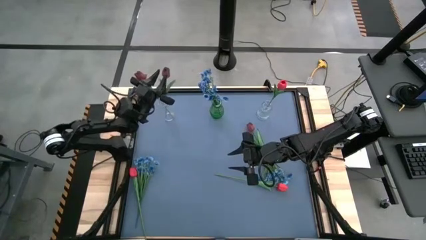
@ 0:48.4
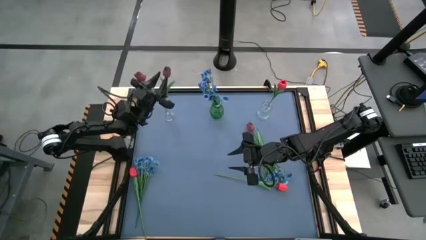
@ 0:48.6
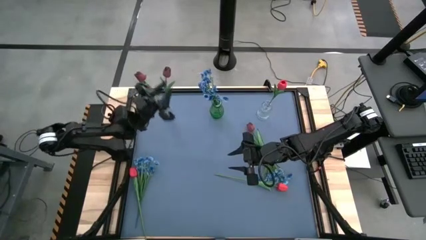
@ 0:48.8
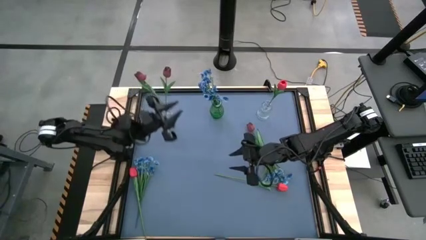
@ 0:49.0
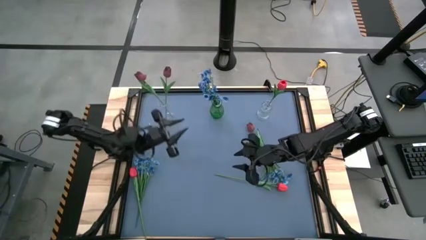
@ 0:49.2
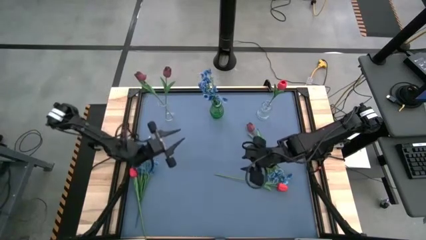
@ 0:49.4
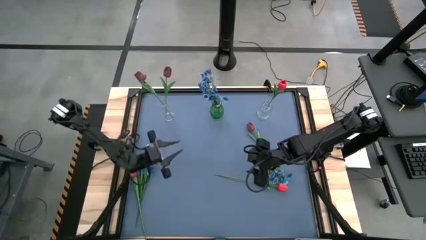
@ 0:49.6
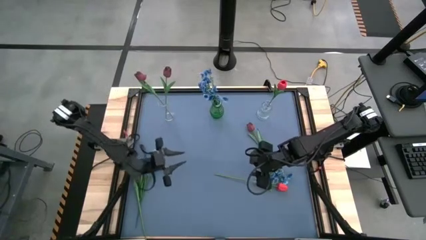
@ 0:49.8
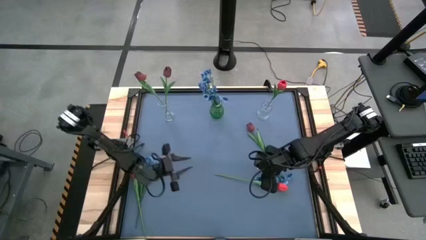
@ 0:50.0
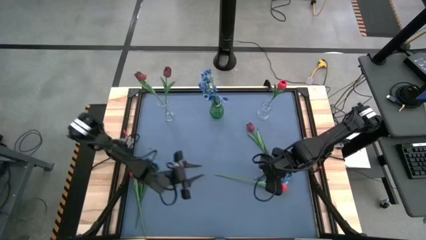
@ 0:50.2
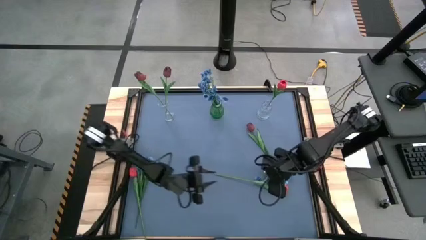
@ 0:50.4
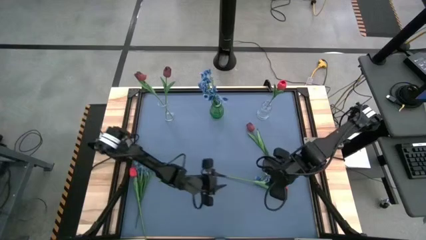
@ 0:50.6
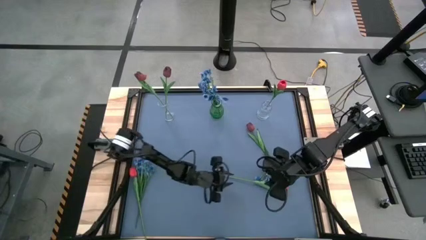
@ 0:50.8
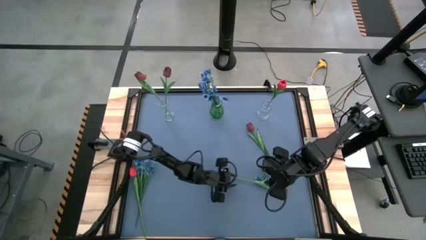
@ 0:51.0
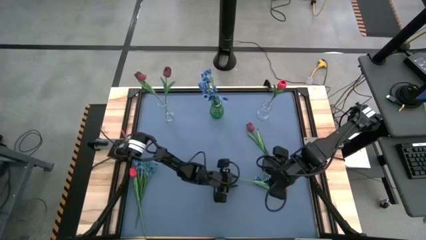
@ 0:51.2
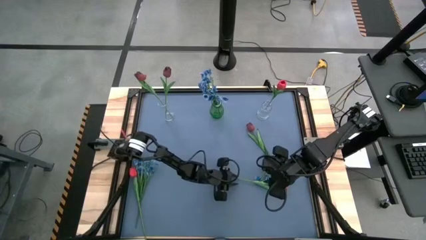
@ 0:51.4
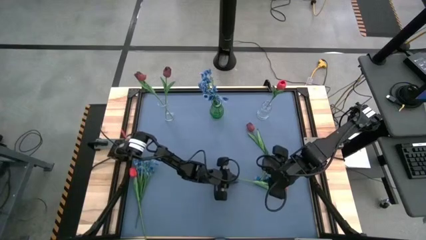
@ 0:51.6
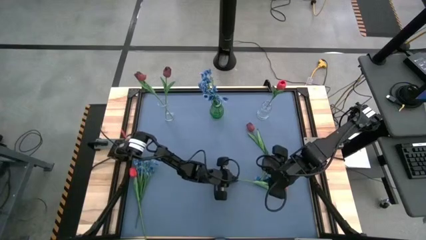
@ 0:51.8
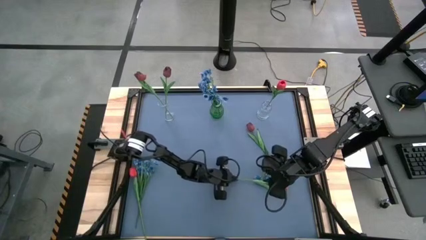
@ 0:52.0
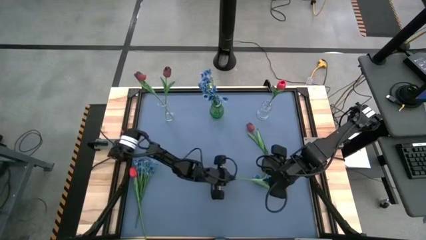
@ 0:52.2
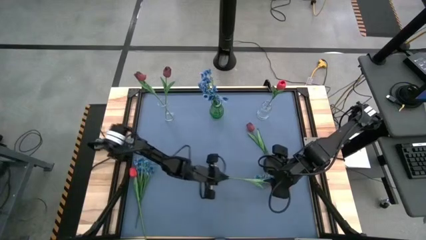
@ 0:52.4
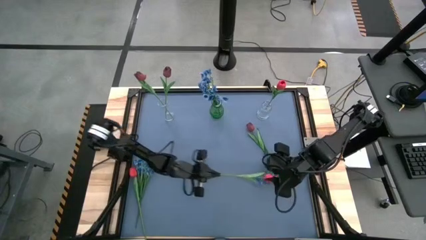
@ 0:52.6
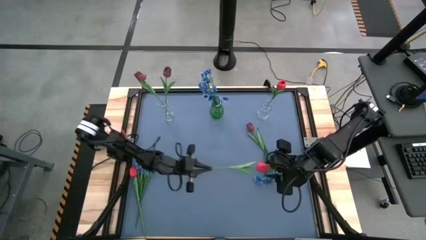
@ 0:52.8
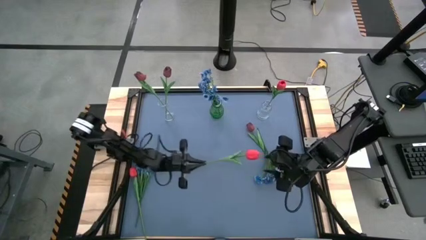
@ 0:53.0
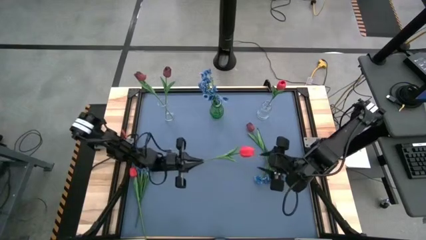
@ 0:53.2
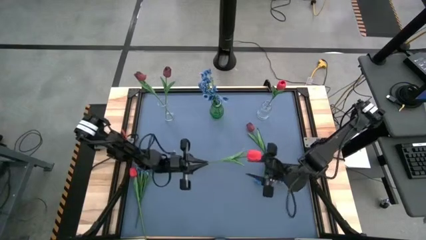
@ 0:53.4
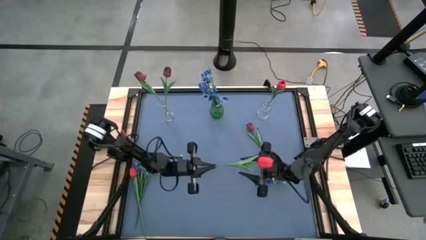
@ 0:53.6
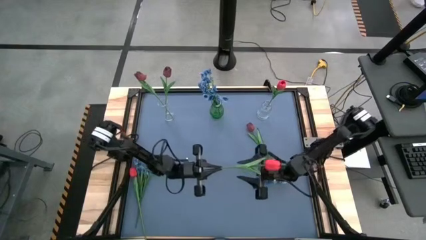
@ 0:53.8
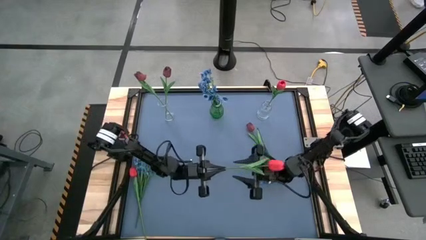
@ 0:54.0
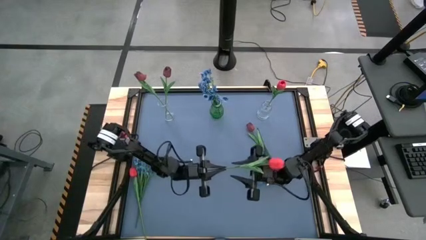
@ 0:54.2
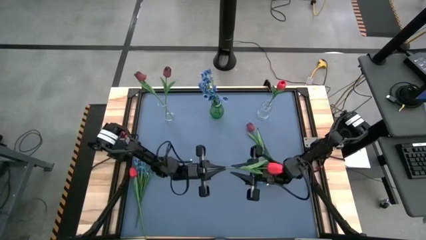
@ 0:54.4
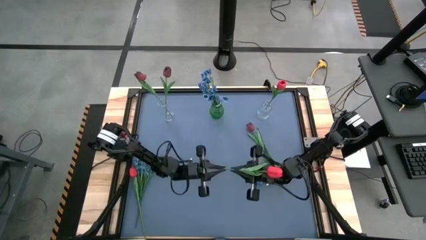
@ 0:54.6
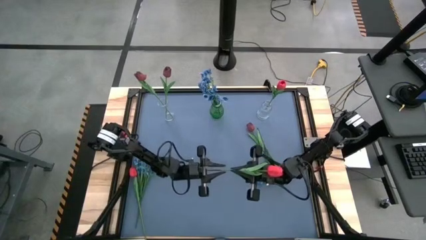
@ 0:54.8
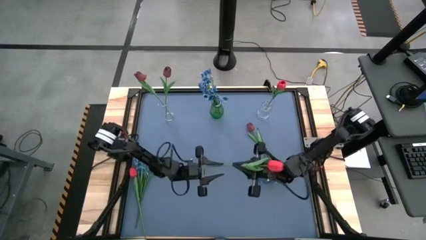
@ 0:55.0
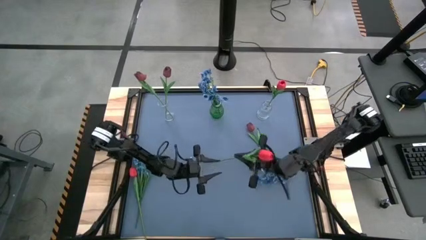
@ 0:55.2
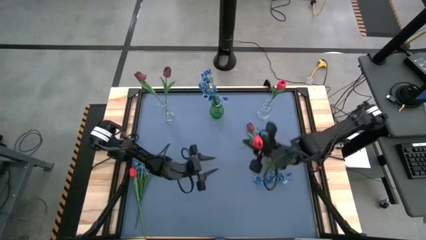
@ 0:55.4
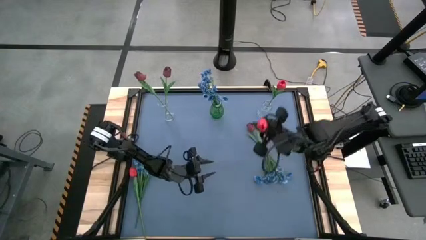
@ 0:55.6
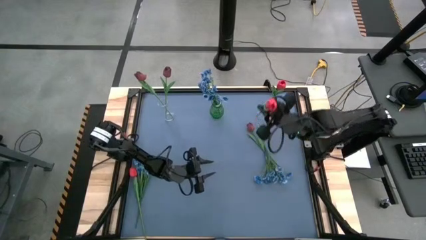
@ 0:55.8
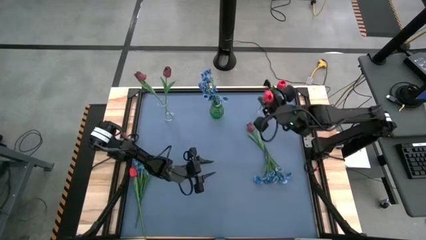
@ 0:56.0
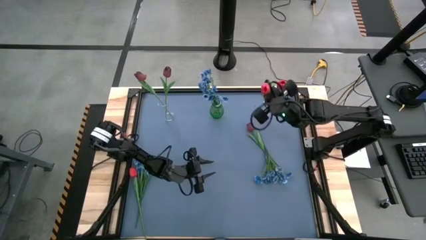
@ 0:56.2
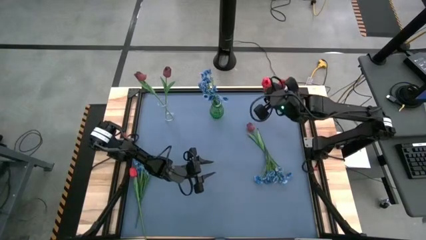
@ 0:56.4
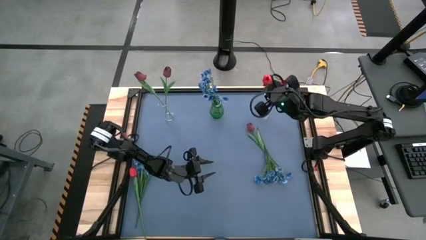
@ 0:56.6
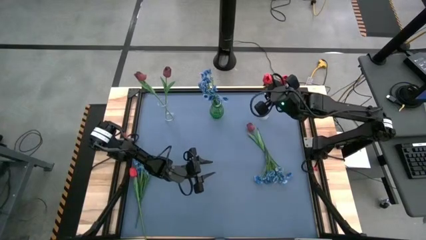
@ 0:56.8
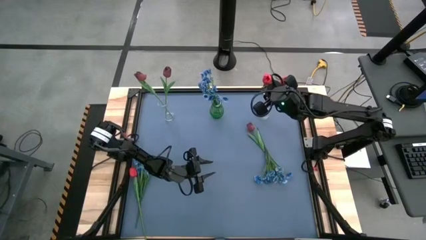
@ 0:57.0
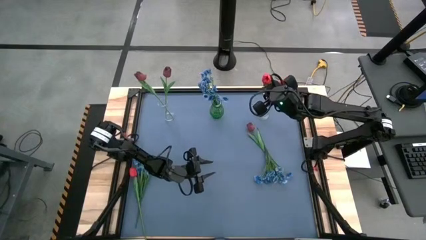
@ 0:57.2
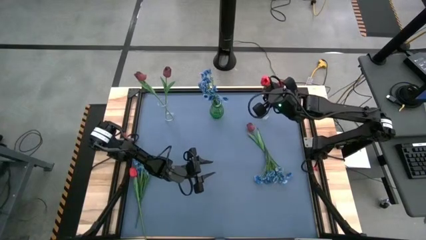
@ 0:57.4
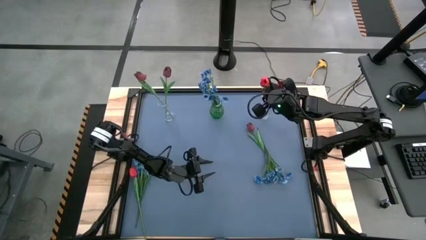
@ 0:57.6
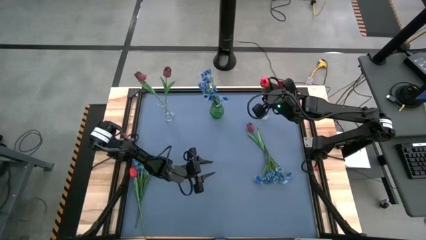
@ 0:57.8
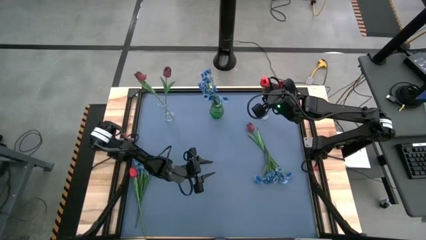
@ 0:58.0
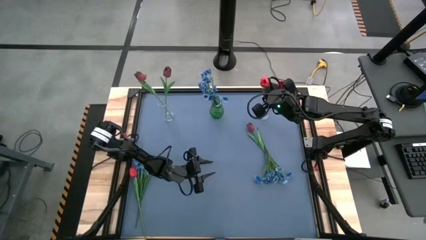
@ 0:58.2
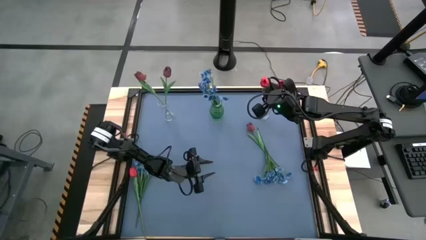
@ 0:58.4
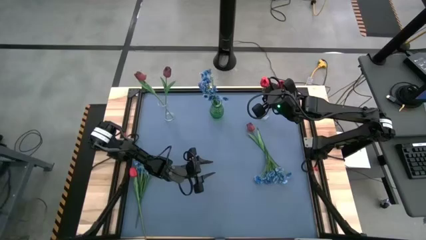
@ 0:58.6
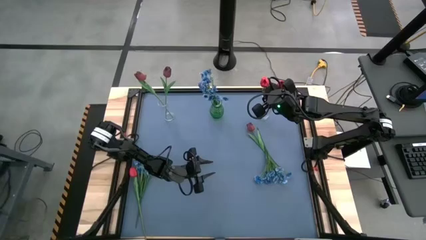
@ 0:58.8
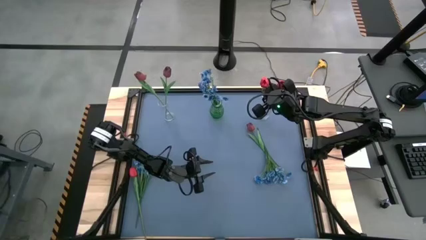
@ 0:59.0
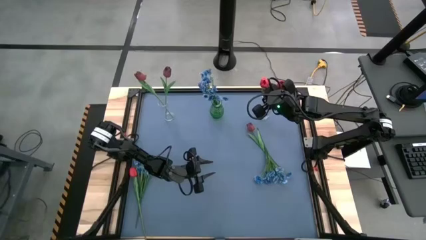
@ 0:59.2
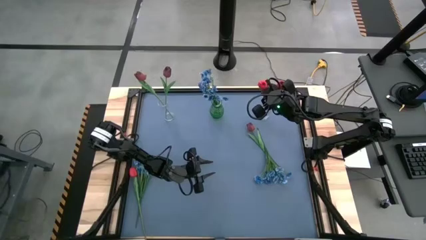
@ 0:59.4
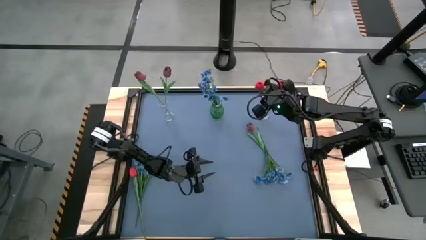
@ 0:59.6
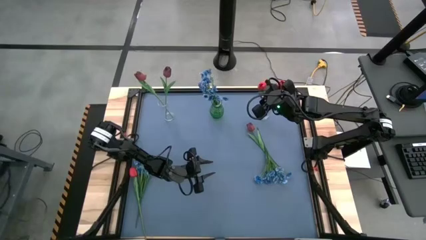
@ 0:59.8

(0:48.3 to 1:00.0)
Task: Sort flowers into vase by color
Put the right pink flower into the right transparent vase
